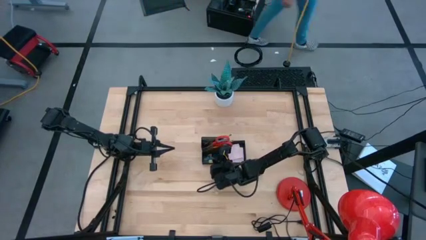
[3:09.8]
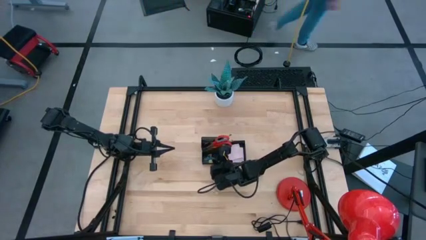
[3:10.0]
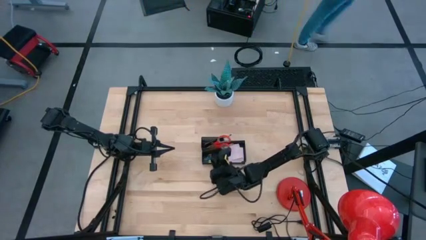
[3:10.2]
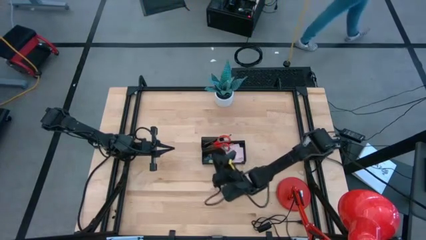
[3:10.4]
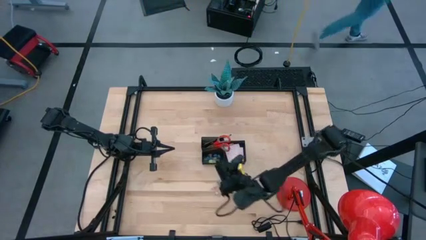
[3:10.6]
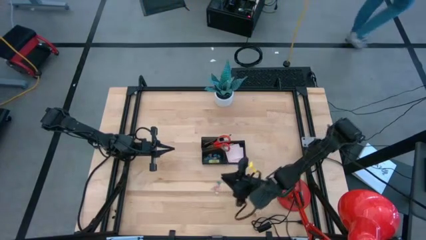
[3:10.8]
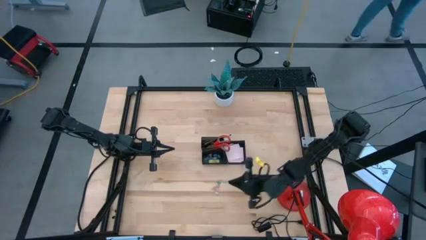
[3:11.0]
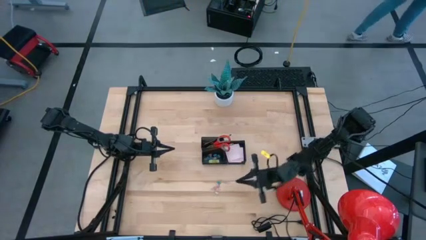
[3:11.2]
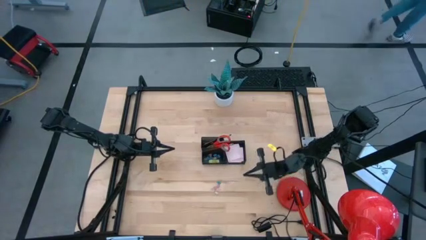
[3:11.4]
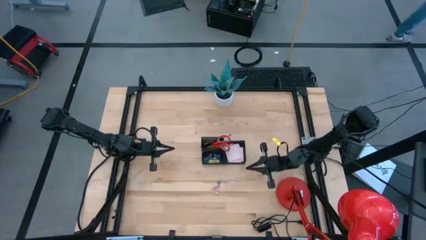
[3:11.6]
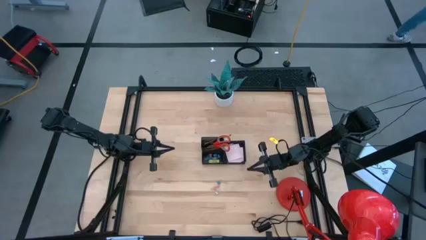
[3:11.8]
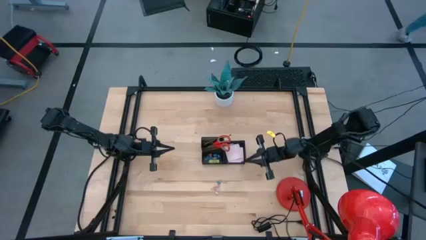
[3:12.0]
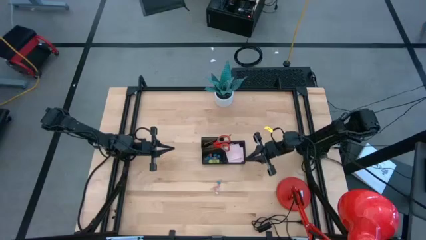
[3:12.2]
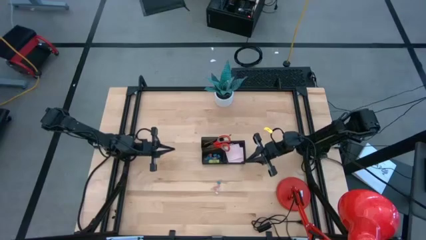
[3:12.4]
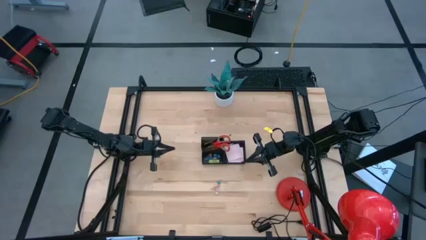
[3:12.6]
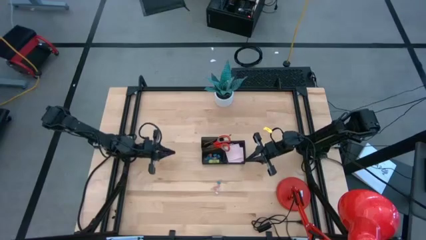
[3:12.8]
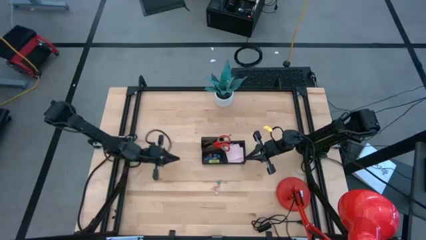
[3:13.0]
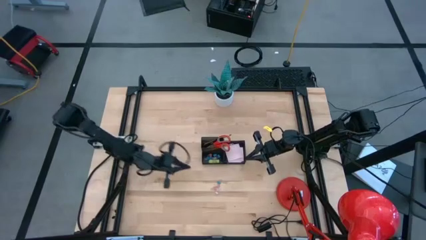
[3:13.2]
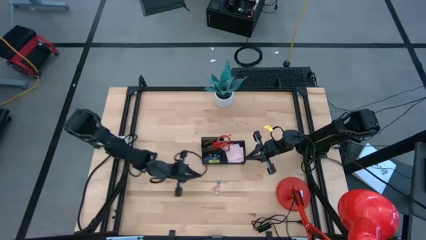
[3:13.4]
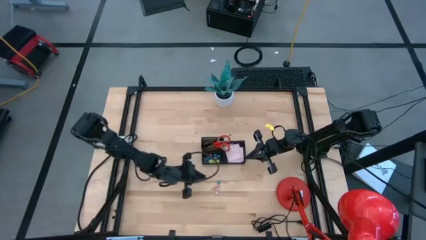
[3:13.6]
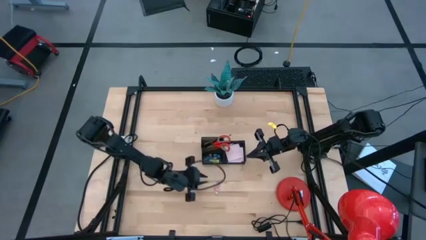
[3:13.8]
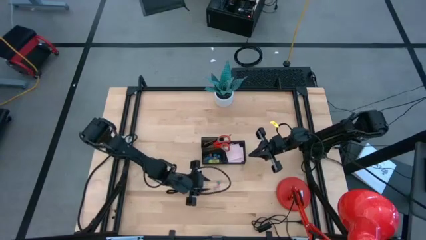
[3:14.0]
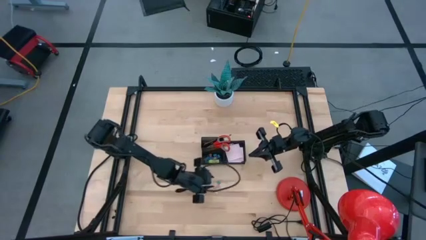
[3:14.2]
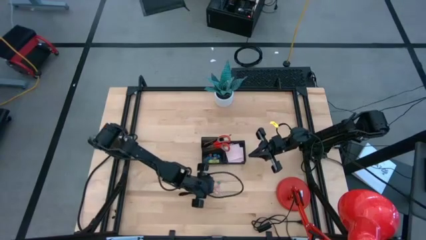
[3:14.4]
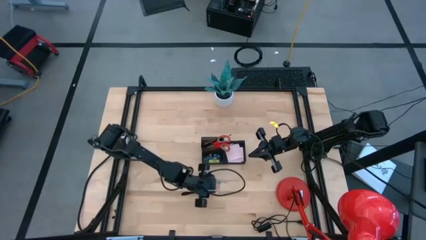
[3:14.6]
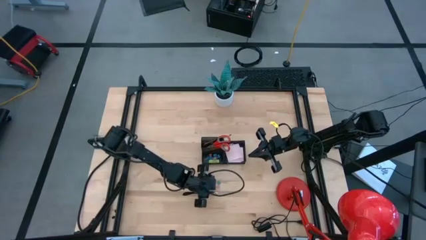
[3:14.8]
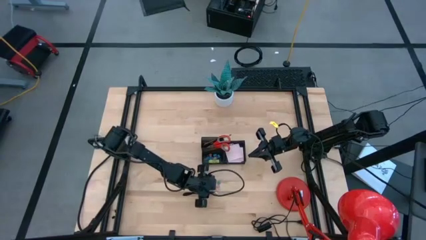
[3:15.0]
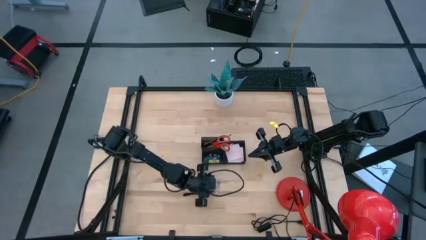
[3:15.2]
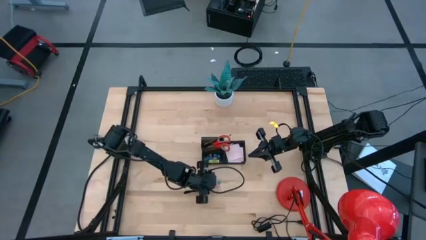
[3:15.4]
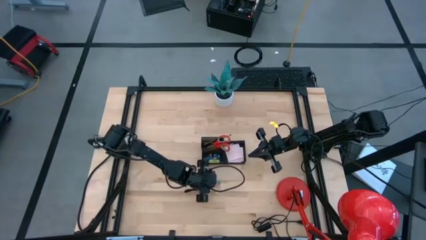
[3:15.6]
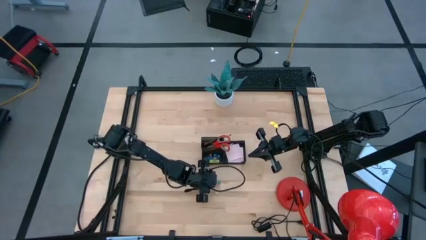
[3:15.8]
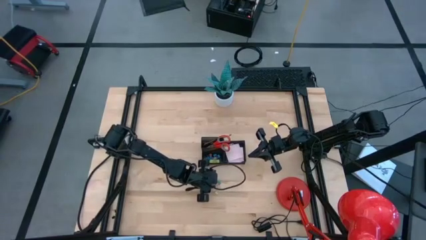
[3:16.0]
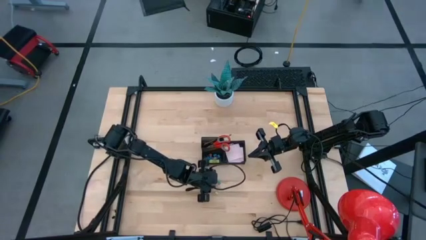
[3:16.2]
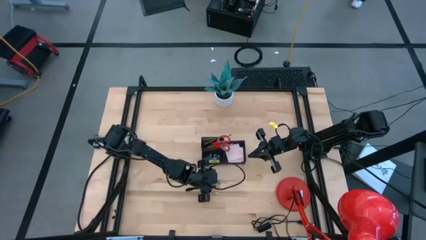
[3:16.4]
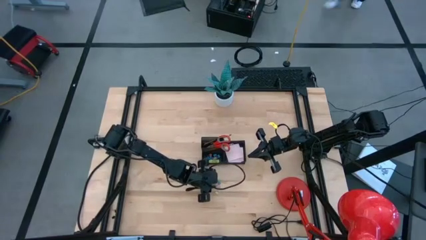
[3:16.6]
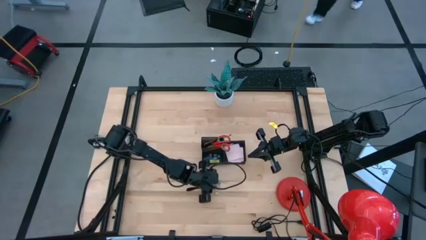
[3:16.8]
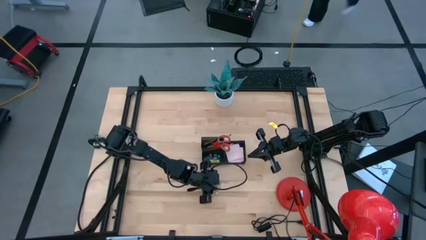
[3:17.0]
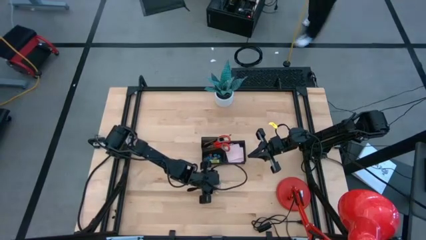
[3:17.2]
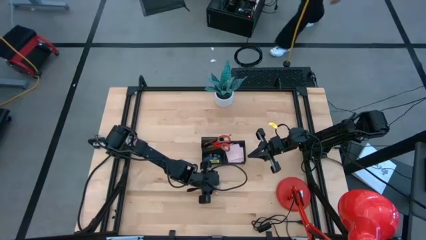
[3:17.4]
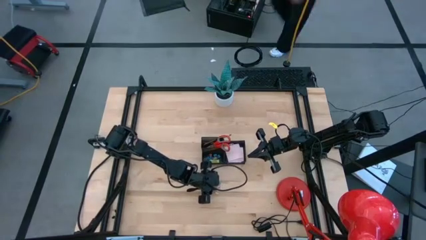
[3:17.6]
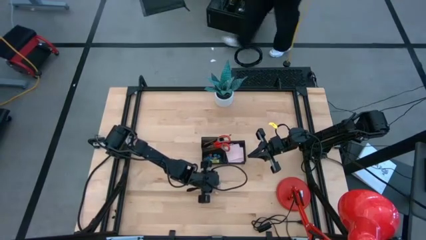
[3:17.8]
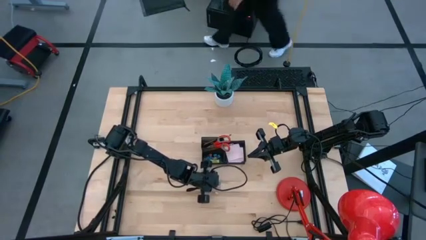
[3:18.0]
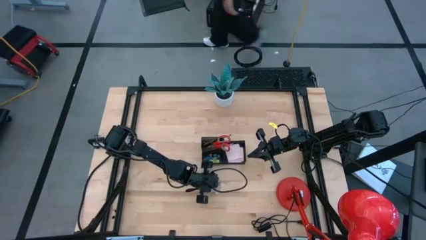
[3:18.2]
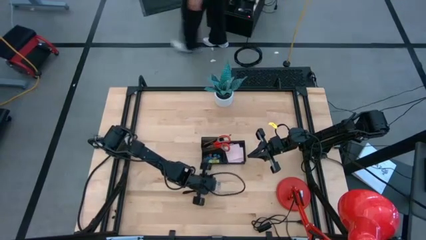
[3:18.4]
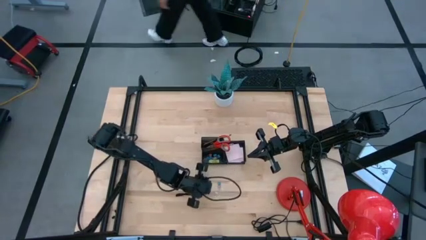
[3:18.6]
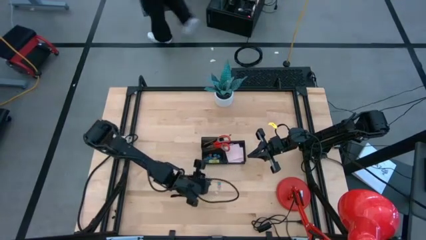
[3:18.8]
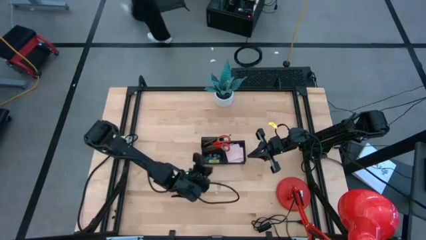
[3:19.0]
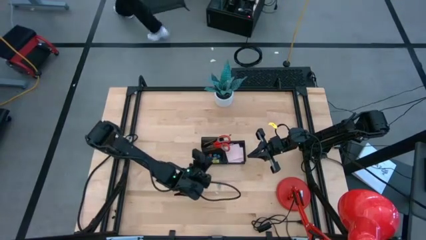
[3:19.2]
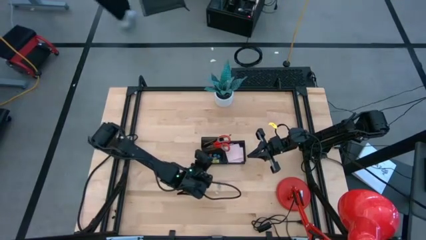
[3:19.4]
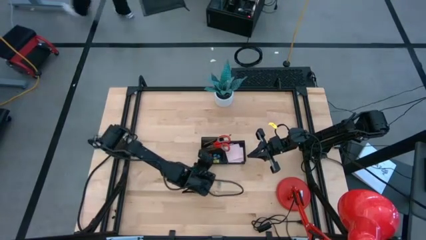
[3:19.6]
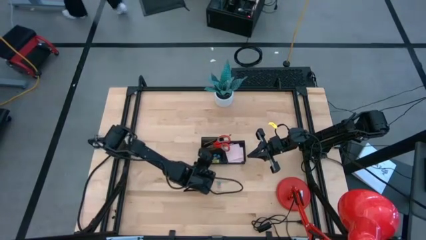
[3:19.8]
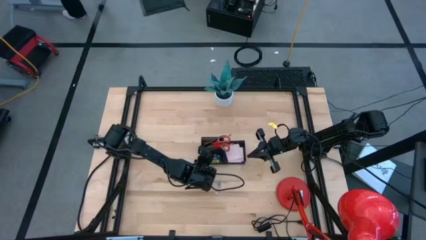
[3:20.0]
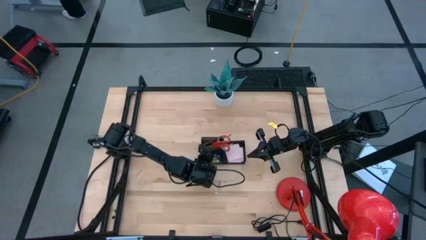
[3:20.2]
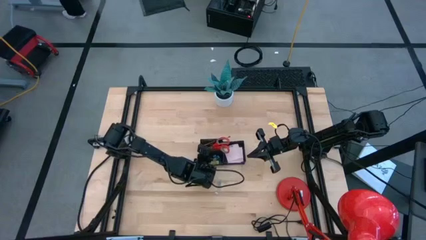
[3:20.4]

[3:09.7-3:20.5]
Task: Pick and place office supplies into organizer
Put the pink binder clip into the desk organizer

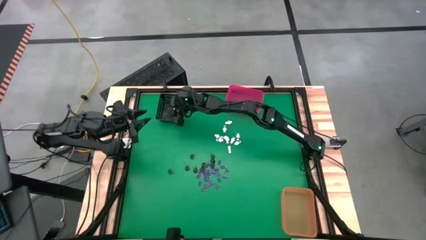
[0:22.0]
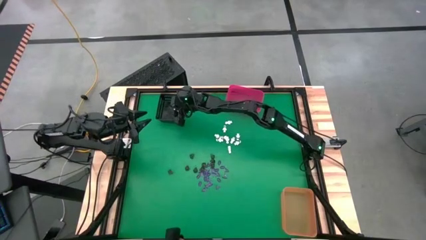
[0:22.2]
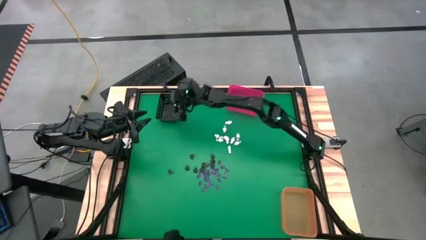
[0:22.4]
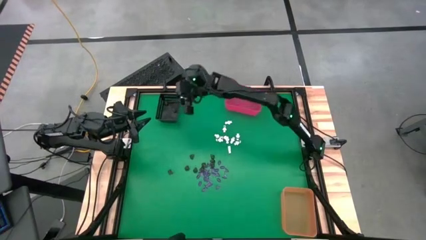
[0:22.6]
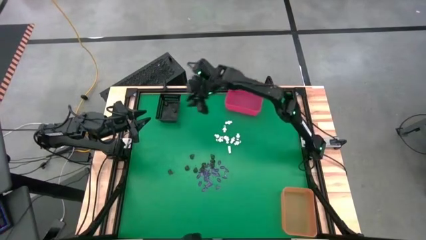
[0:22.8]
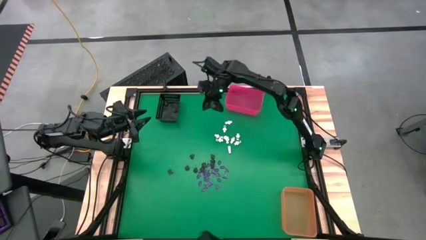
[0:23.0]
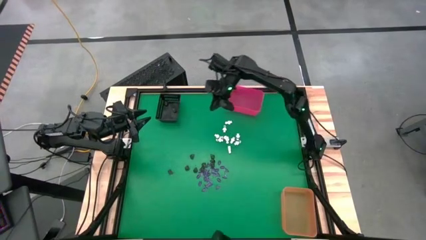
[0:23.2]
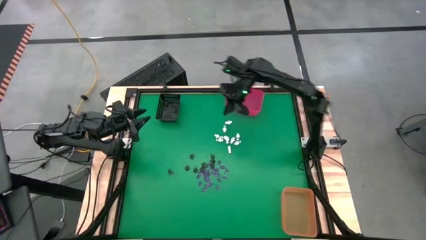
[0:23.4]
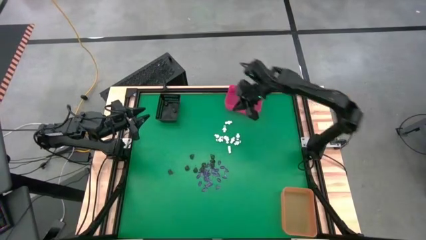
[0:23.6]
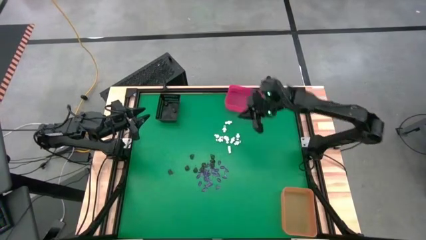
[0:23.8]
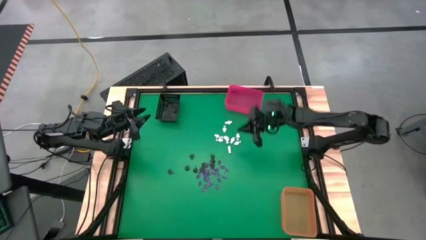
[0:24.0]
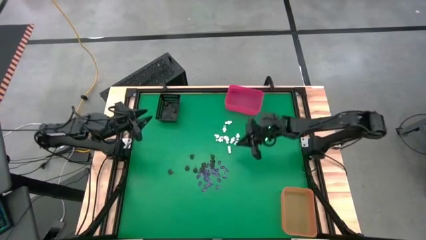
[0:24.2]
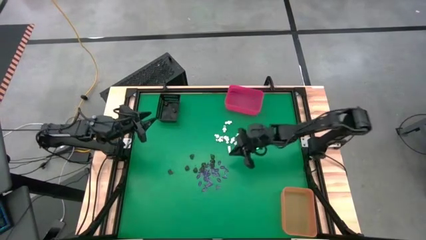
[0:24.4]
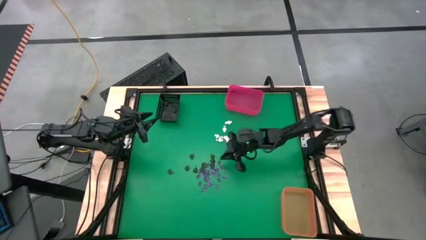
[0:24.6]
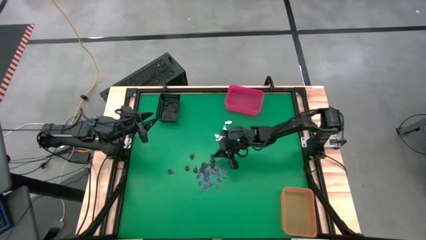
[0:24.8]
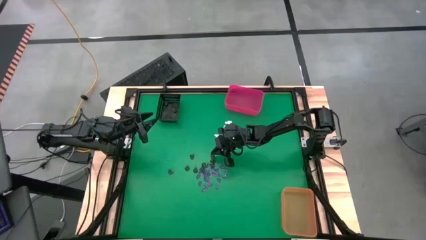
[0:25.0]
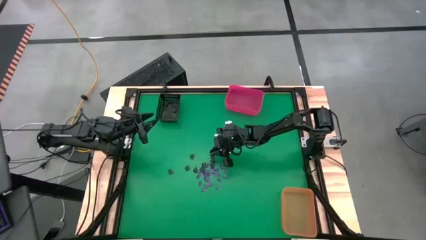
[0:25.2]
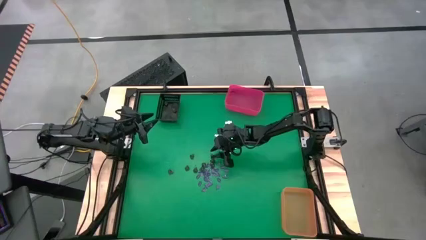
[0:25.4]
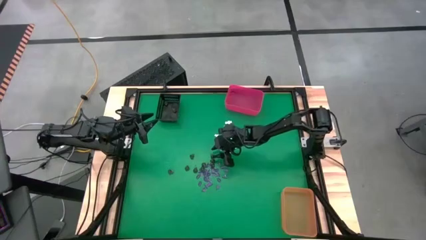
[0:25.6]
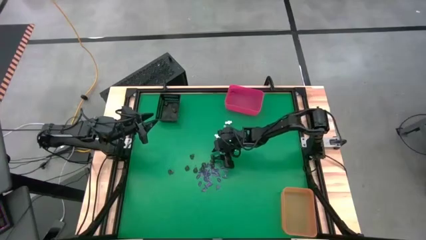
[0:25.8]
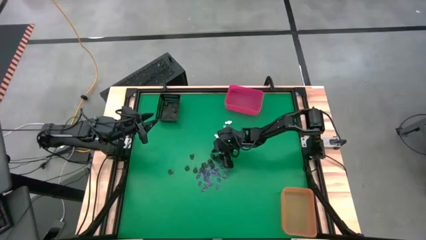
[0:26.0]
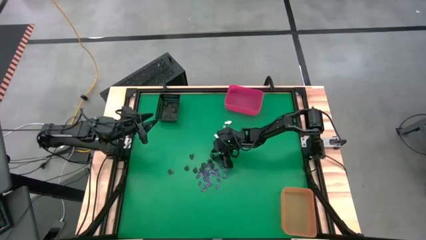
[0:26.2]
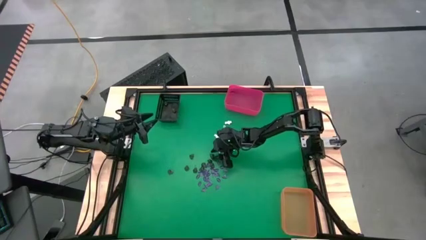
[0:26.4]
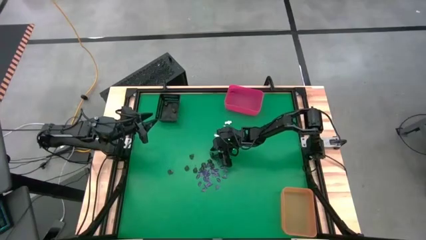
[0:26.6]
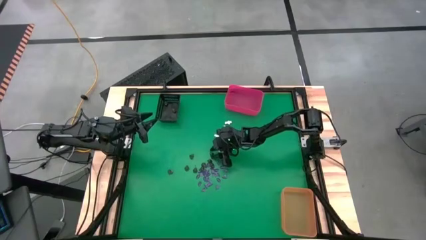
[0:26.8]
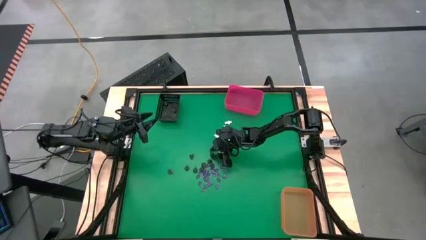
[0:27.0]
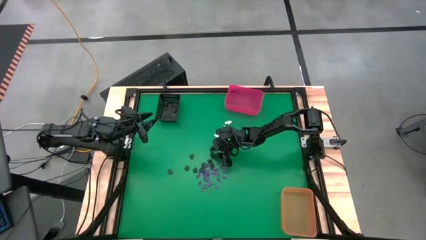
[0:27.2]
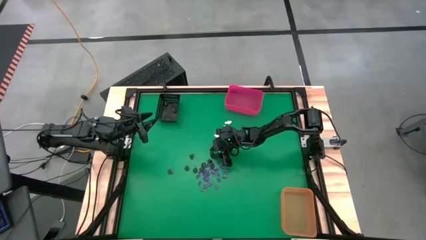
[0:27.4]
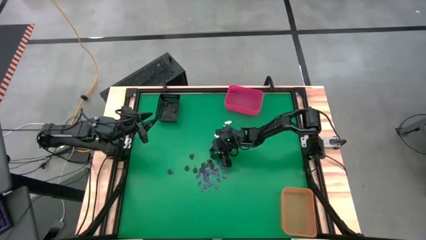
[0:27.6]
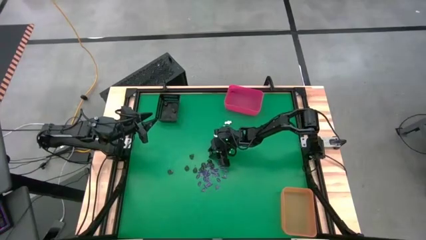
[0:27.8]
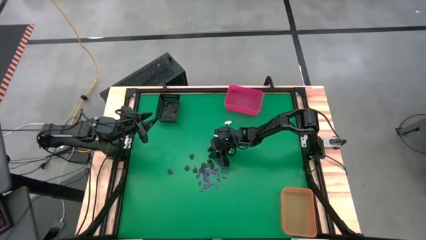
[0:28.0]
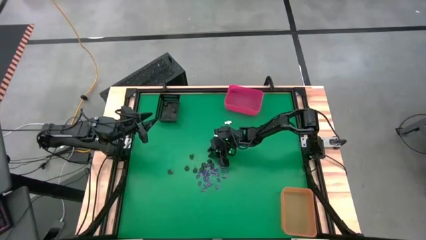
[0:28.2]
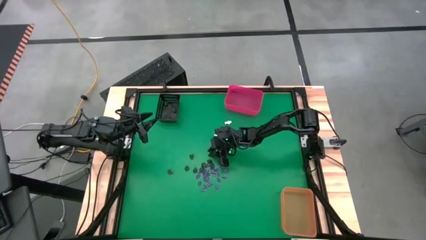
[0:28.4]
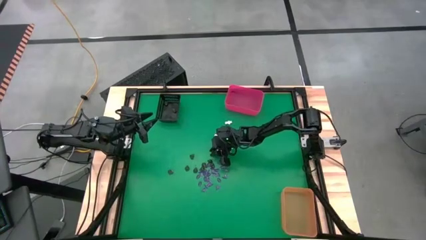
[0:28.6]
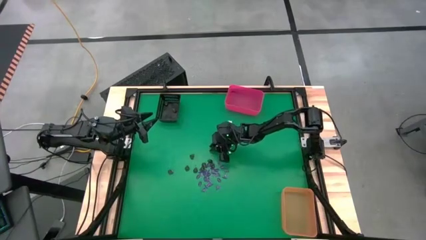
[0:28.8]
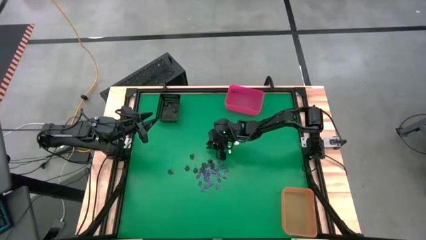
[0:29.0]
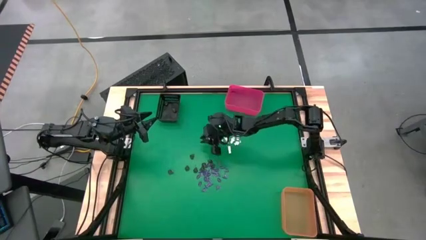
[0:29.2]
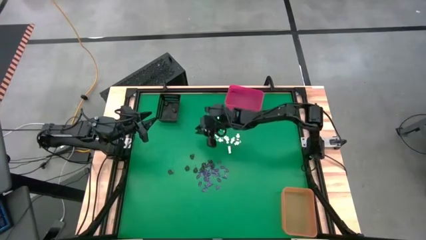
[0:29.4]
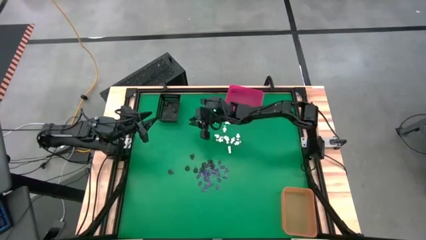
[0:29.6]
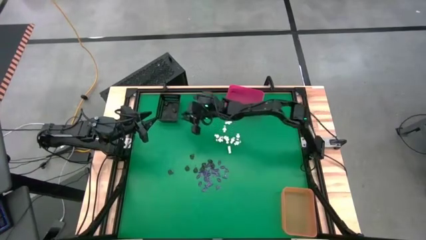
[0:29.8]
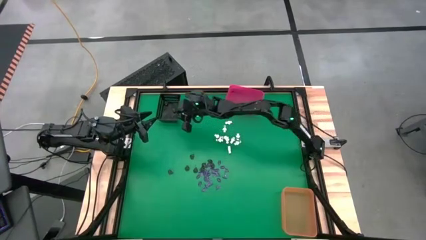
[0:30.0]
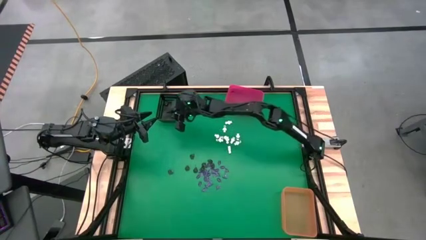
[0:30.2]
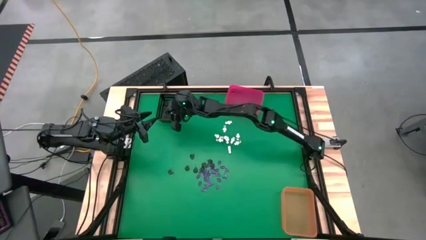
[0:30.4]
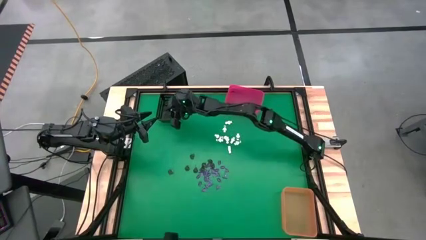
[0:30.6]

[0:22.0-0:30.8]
Task: Sort Halloween decoration
Put the brown skull toy into the black bin
